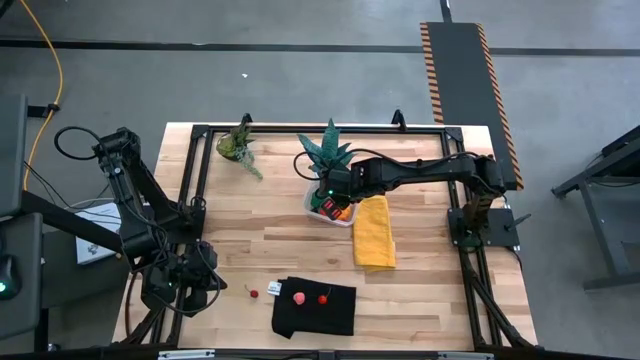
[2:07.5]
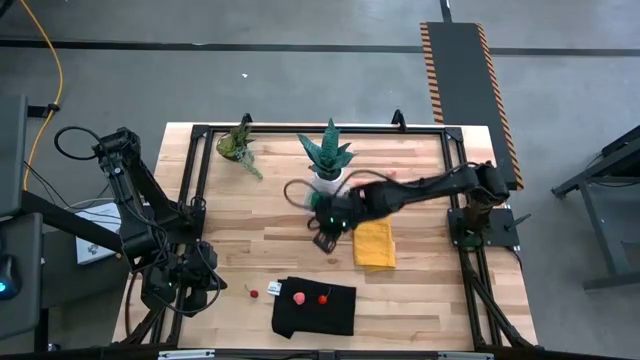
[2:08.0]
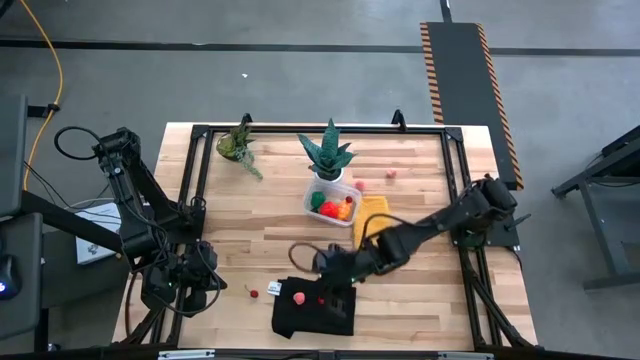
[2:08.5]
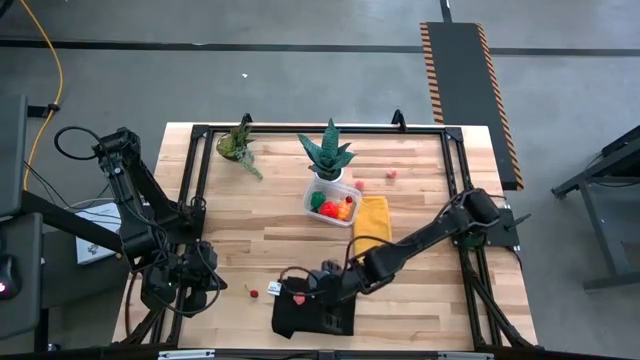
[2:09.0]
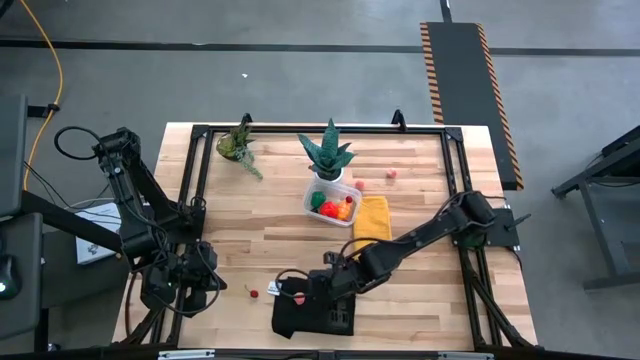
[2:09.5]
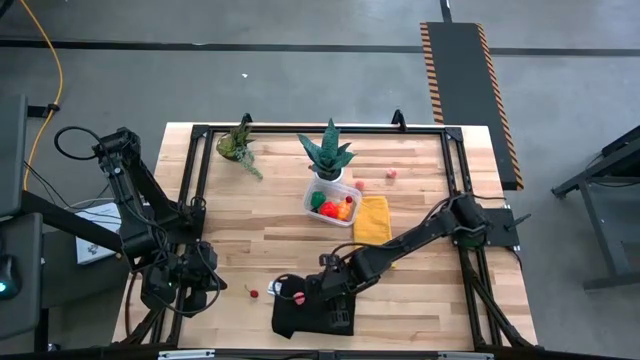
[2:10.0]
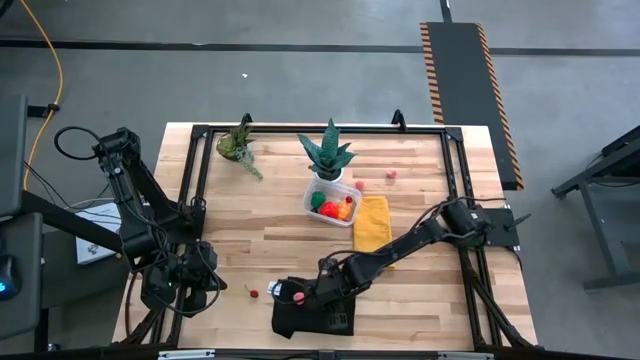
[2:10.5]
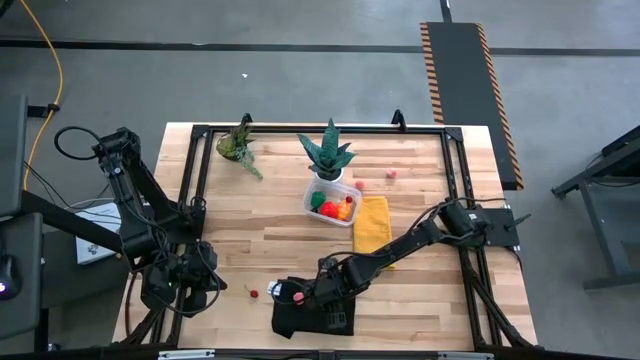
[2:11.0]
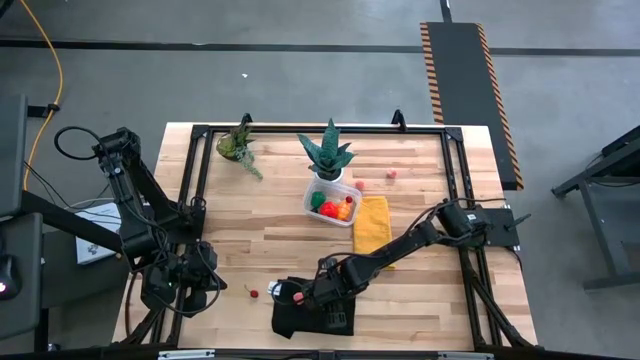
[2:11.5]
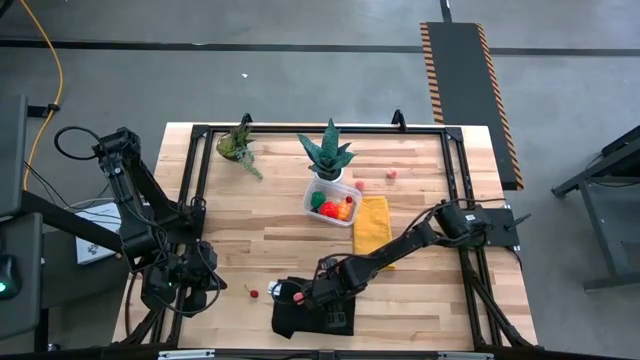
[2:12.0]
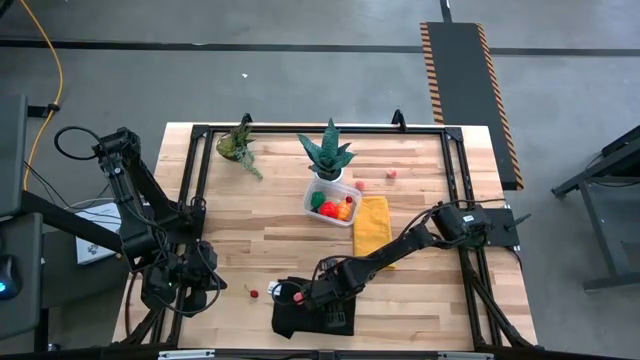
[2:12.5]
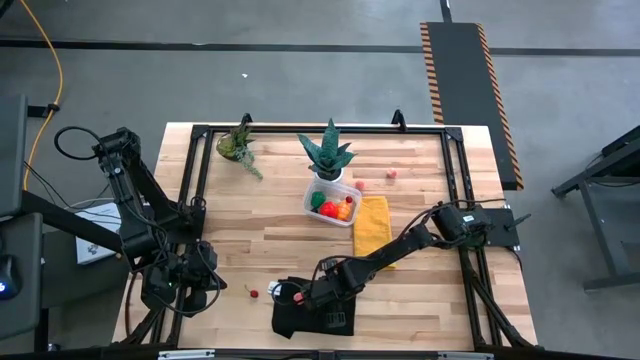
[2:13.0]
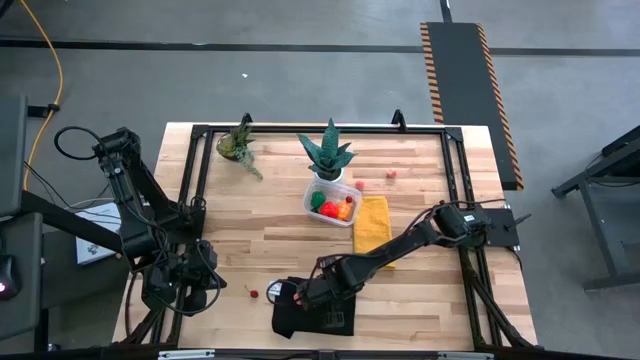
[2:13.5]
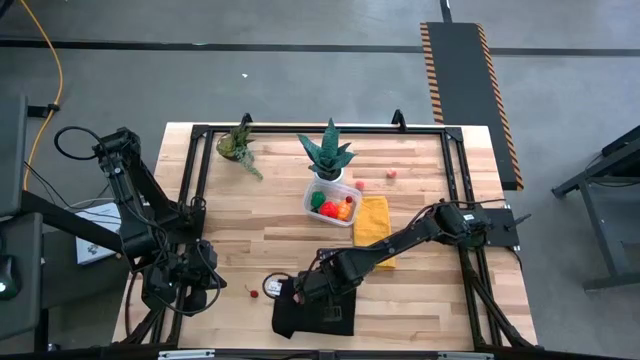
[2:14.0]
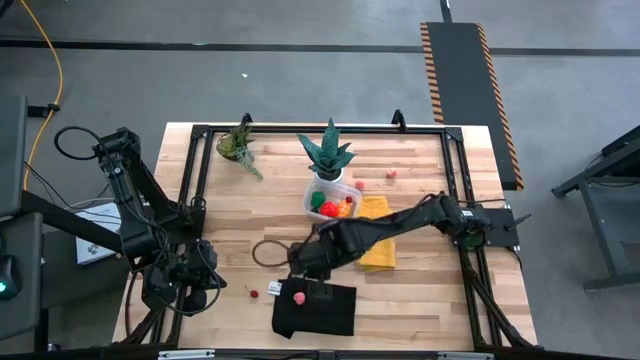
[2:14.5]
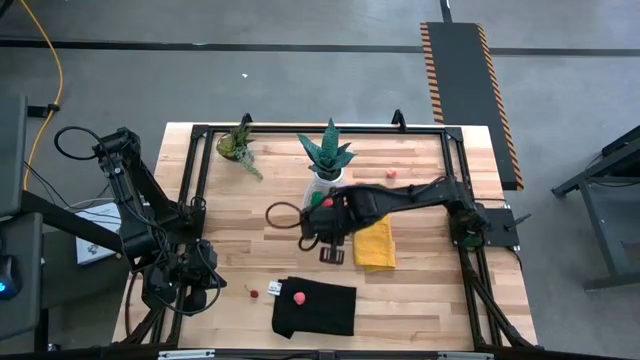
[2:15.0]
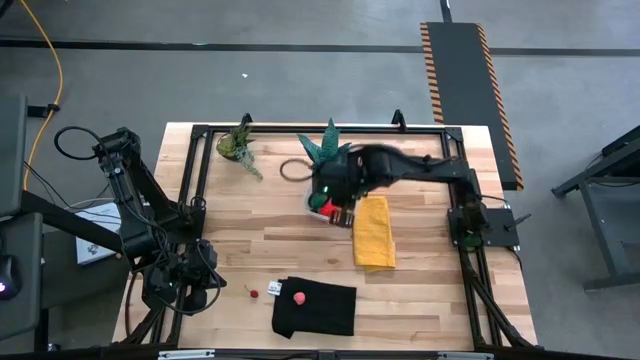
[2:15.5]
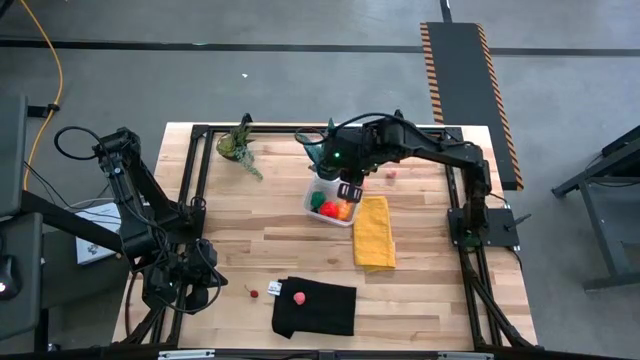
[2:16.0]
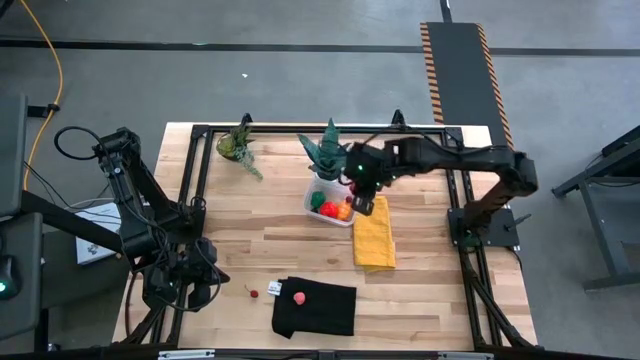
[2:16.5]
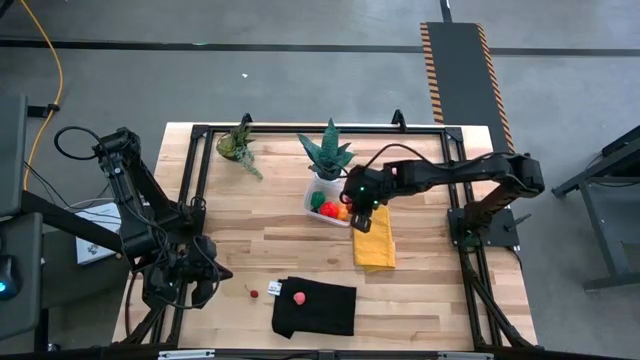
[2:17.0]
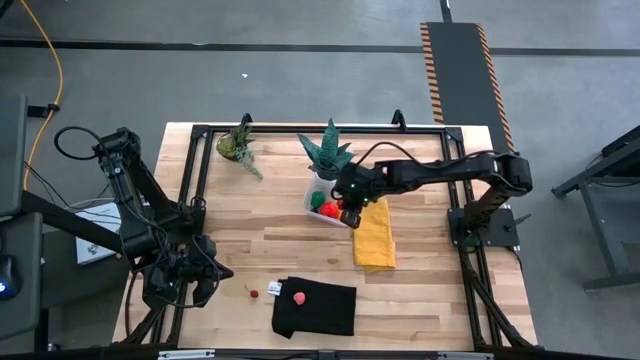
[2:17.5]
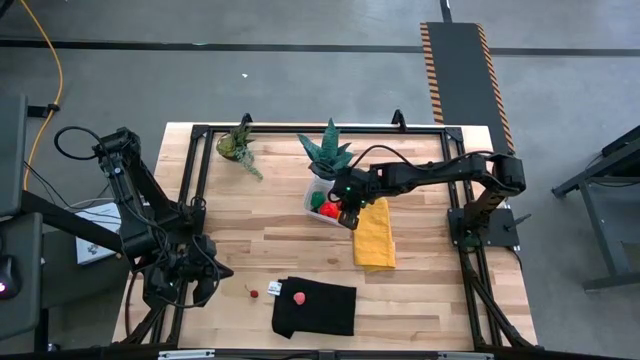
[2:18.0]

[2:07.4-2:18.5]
Task: Pick and placing Produce into tupperware
Put the right red cherry into the transparent container

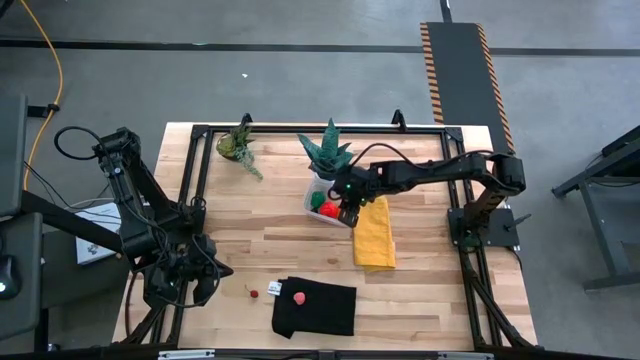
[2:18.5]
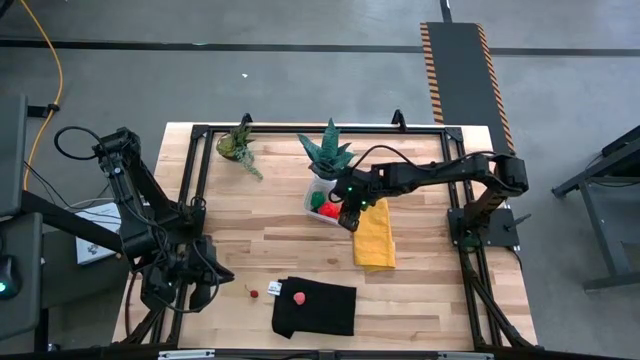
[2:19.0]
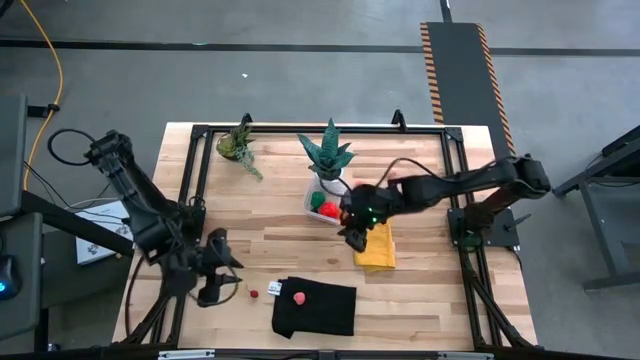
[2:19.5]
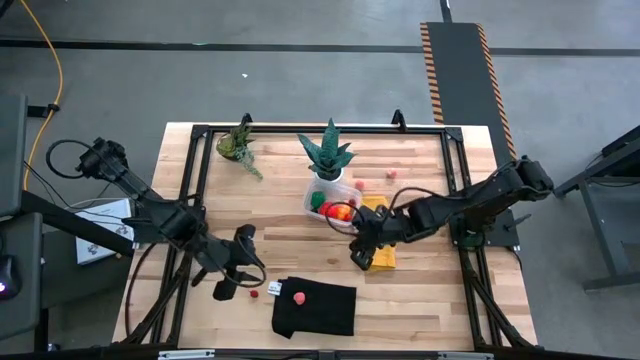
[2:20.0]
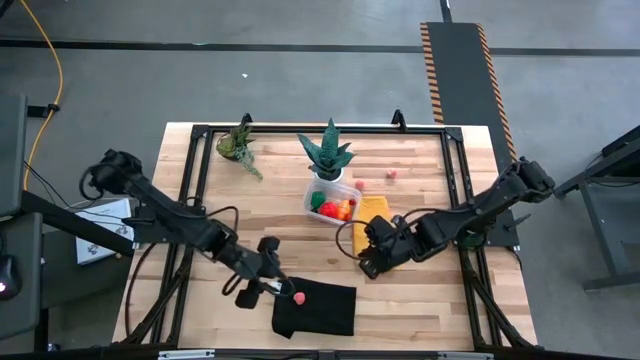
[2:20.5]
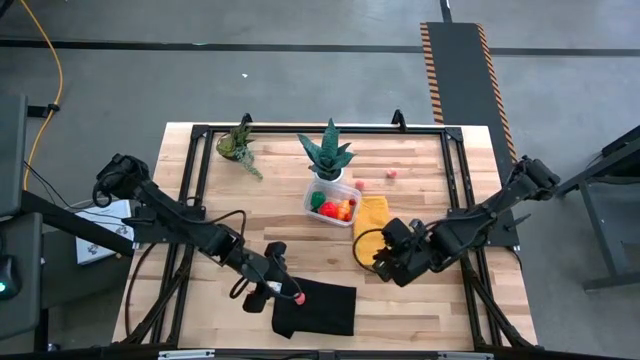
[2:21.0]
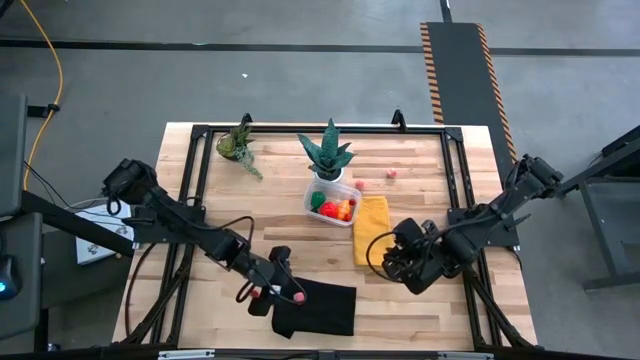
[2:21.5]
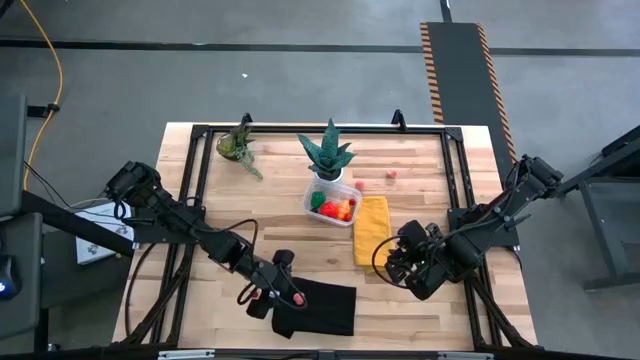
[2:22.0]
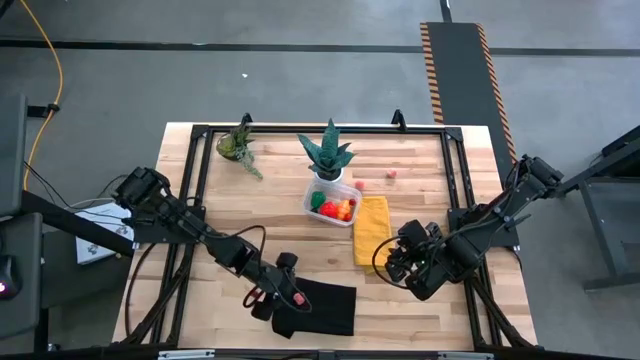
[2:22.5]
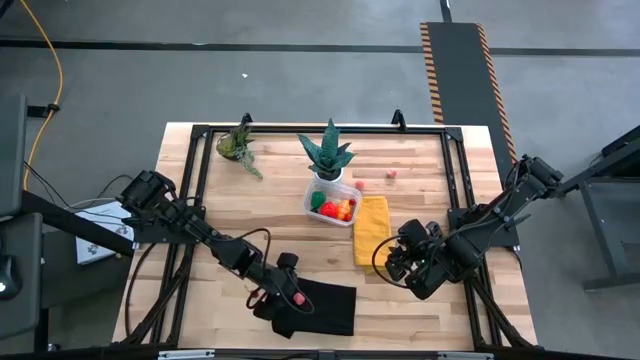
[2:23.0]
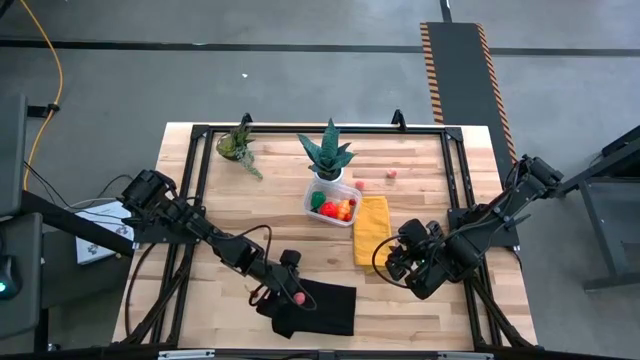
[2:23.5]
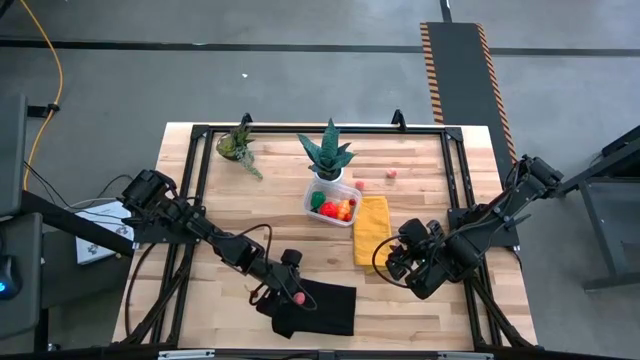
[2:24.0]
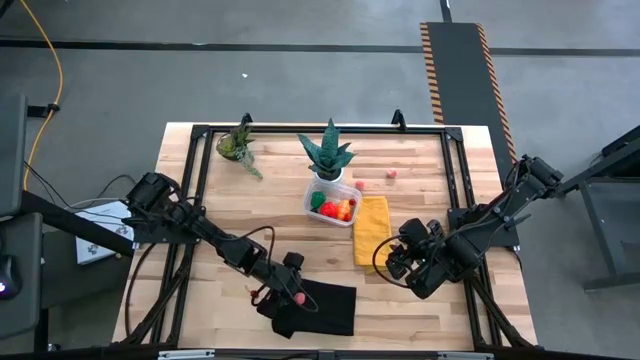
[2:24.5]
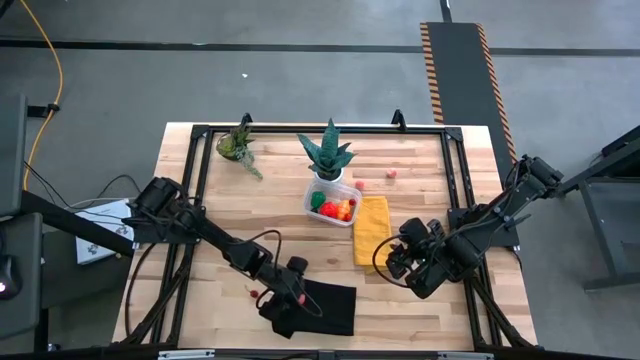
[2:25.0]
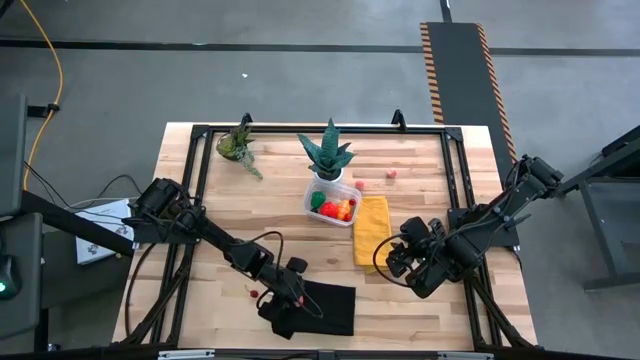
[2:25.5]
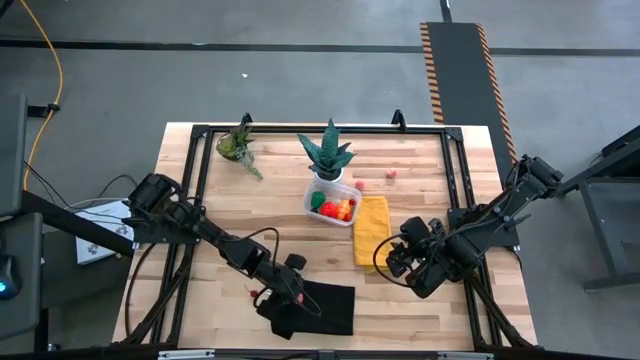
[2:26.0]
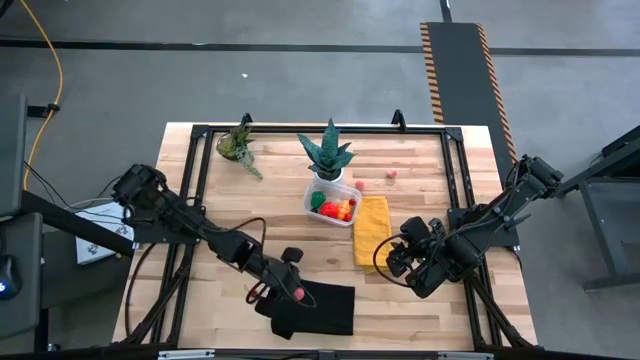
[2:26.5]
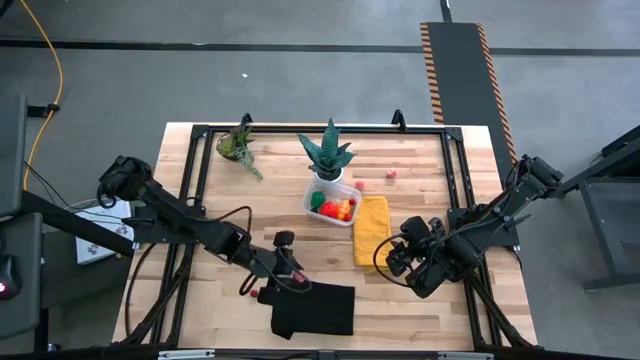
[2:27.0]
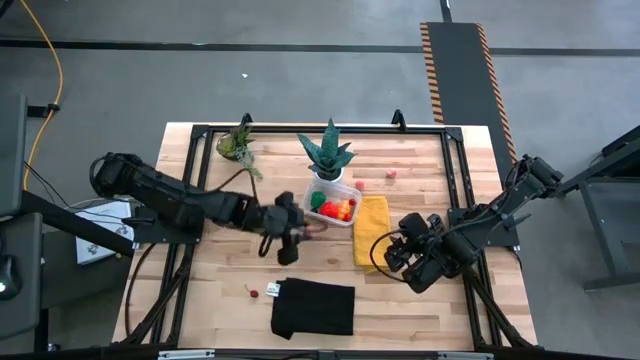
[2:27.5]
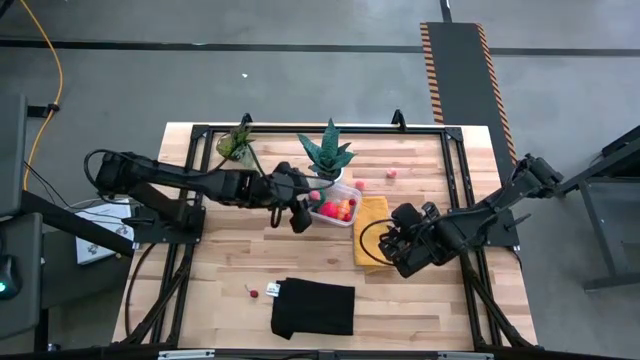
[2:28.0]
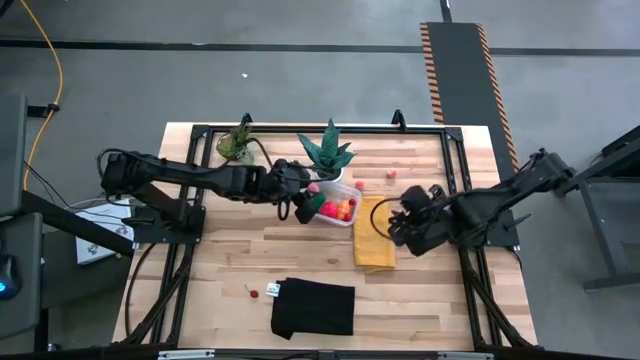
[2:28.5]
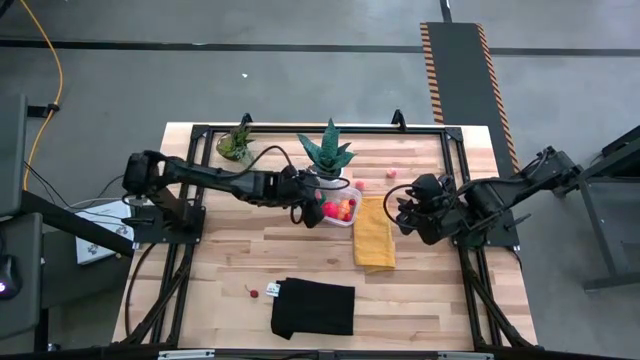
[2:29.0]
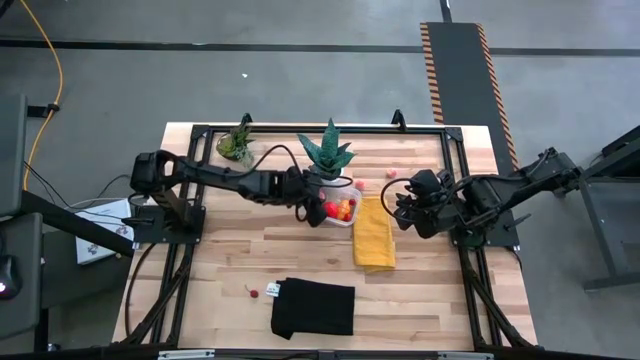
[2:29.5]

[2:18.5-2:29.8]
Put the bottom pink peach into the transparent container
